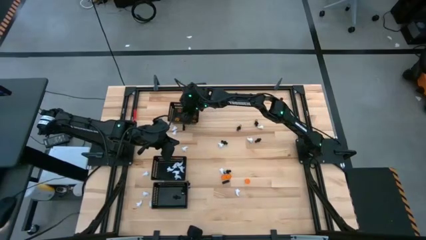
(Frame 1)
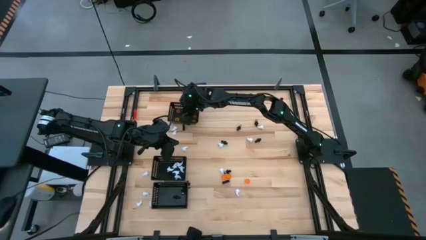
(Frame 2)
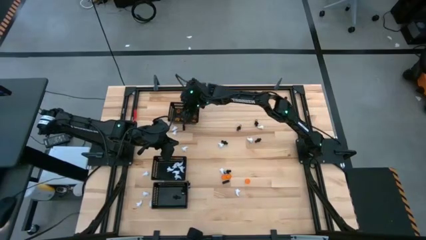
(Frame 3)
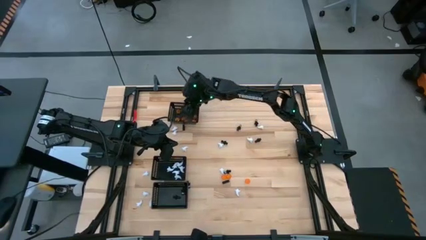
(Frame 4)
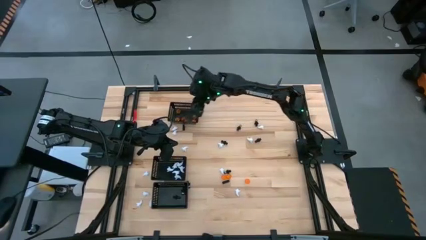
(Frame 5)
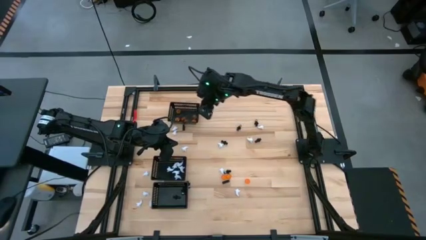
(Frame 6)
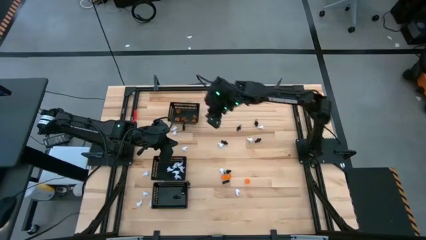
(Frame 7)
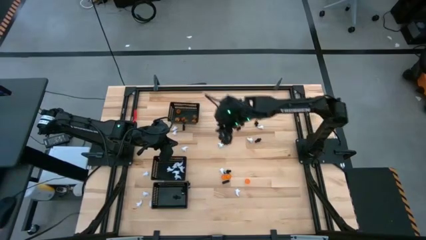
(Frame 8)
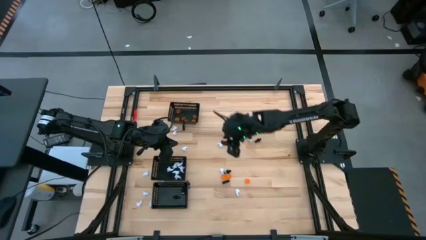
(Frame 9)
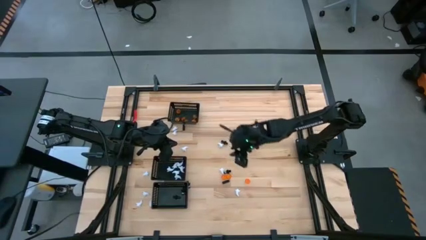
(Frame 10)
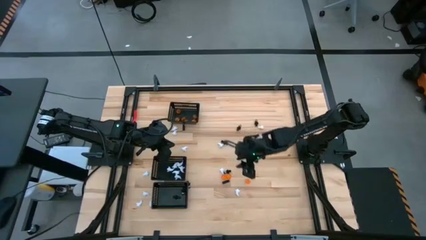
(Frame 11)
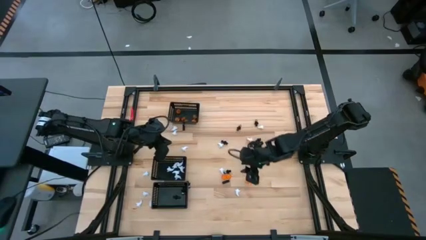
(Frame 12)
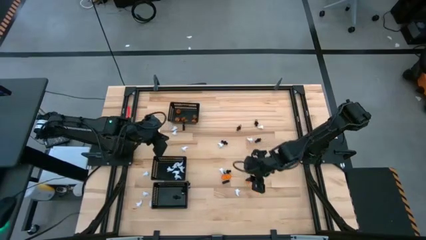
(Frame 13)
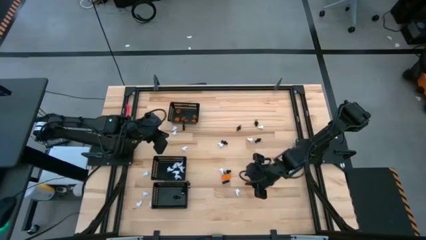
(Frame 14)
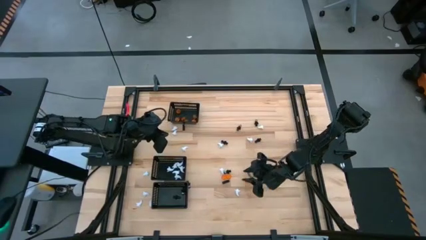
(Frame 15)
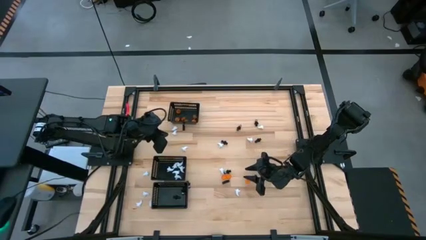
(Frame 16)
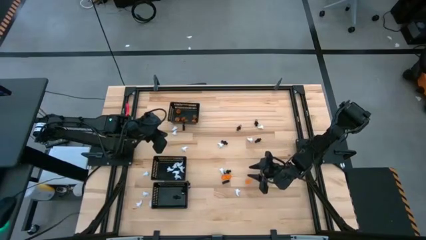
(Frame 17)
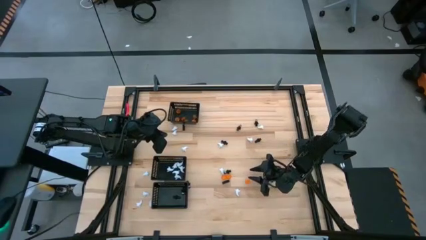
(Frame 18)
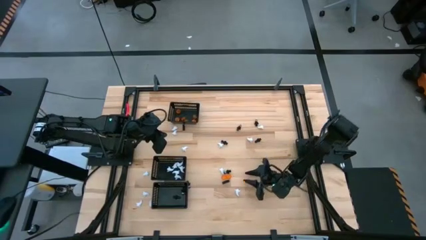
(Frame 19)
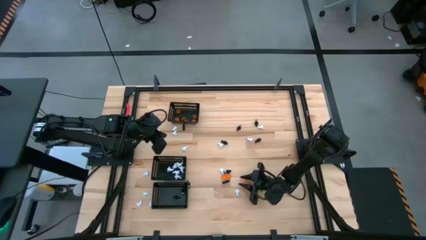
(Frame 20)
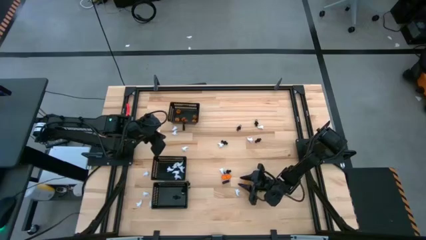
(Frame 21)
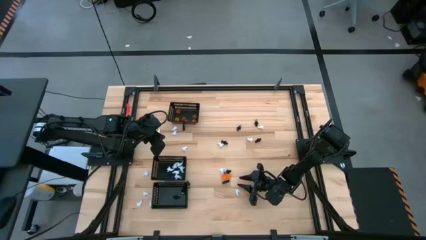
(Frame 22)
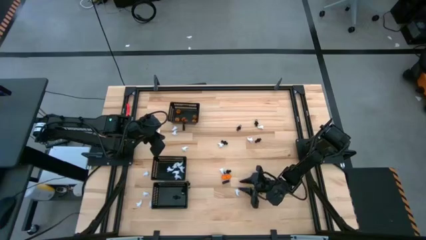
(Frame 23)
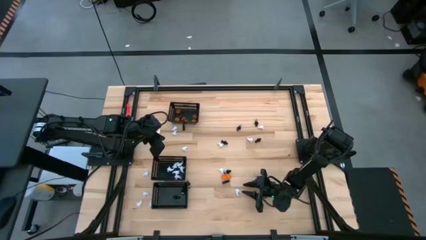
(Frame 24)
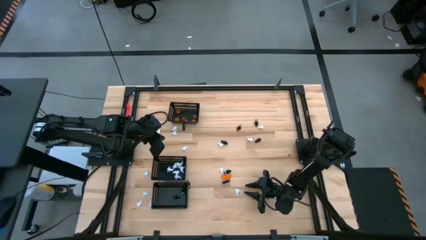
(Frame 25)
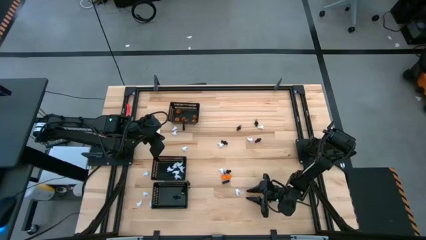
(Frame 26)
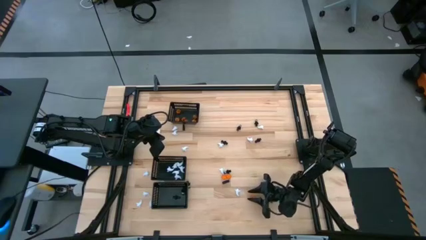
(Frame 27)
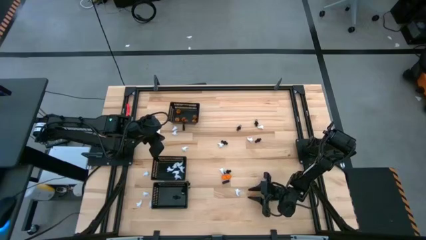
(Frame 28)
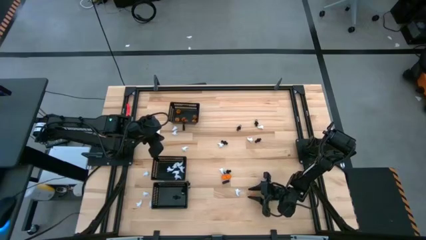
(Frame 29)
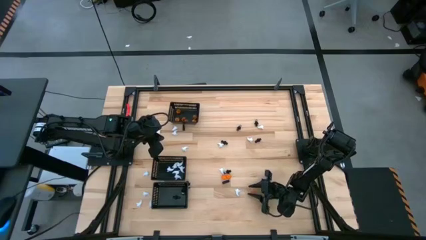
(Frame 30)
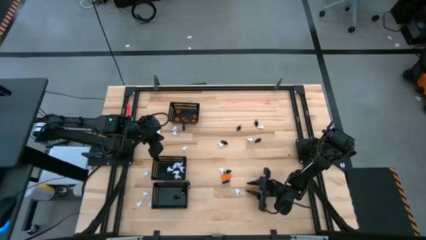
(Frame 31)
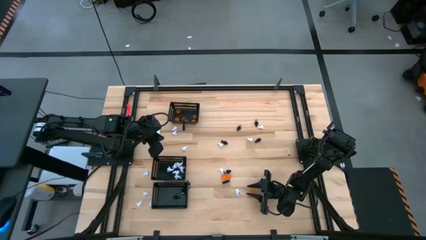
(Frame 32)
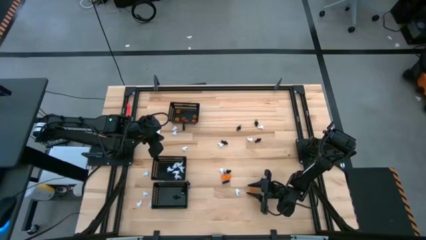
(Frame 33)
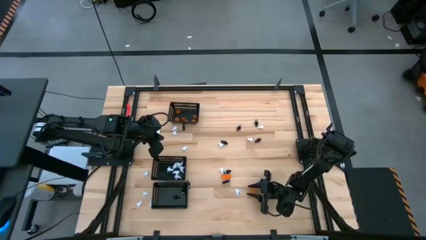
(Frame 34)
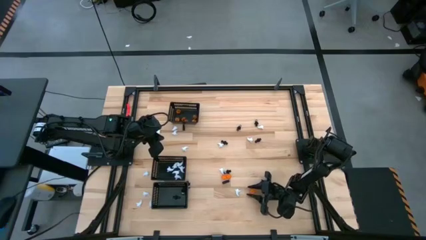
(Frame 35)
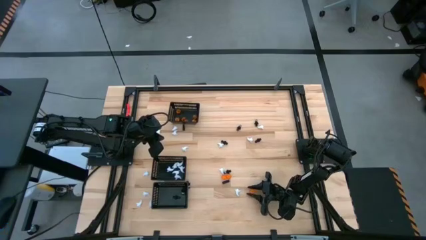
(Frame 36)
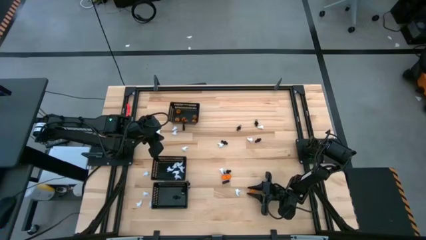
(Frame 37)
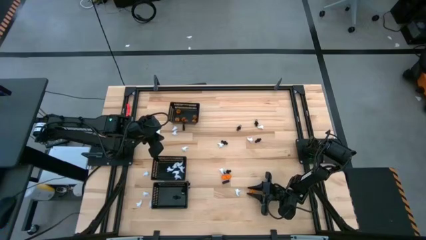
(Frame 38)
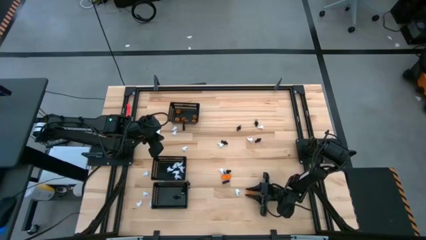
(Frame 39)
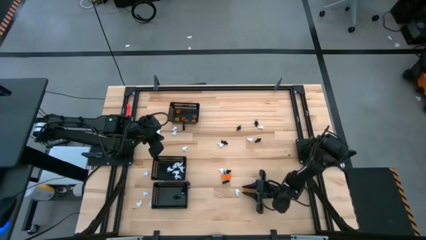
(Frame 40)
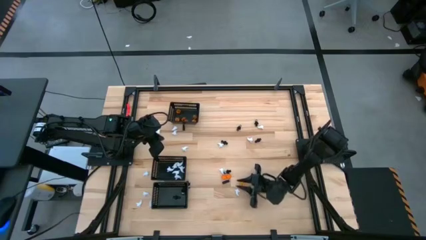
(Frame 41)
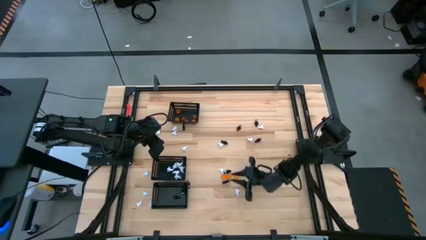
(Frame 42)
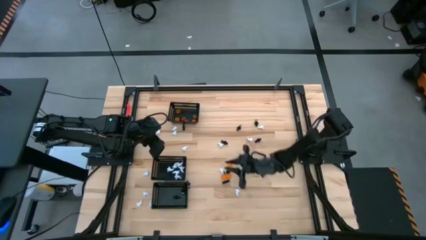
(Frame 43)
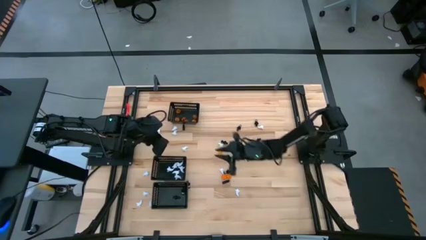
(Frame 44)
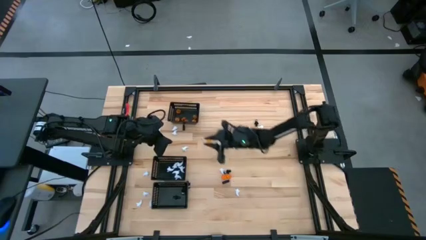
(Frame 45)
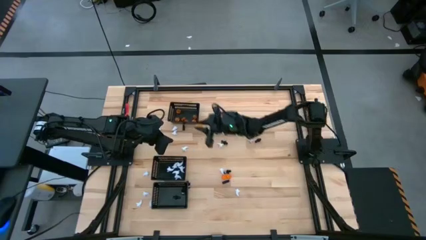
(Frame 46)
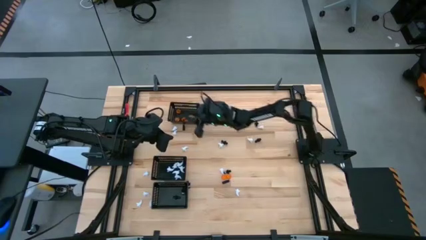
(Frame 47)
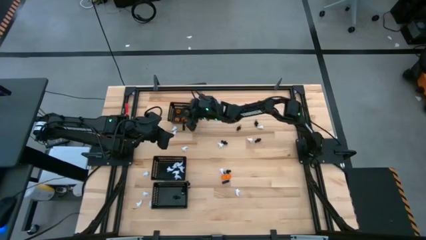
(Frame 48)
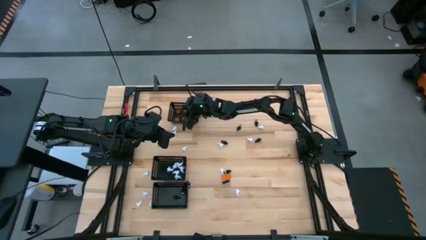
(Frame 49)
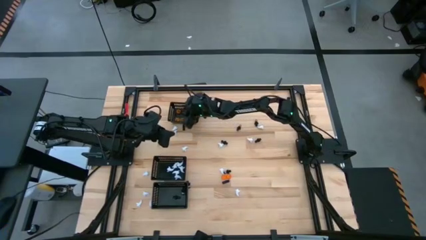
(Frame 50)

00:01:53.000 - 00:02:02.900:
Task: Sort Halloween decoration
Put the bottom right orange pumpkin toy into the top black bin

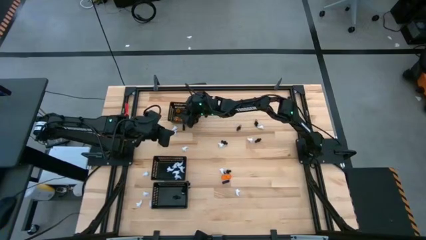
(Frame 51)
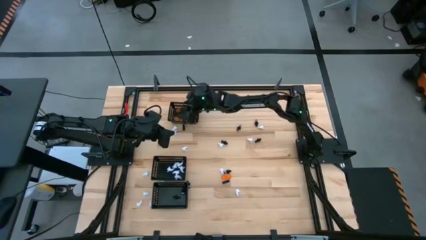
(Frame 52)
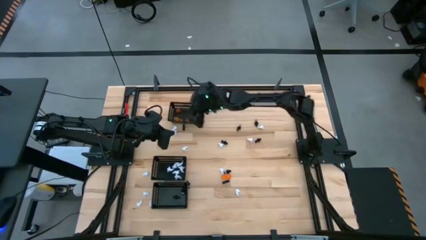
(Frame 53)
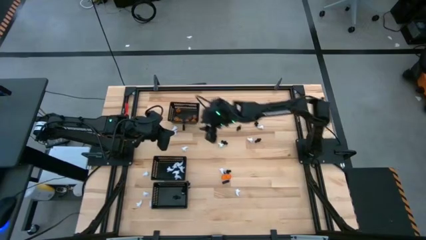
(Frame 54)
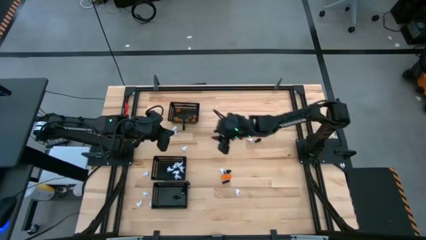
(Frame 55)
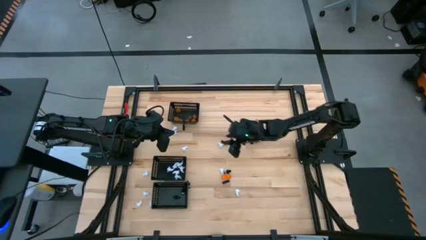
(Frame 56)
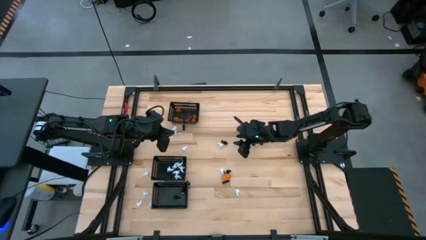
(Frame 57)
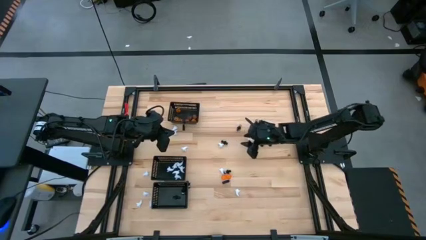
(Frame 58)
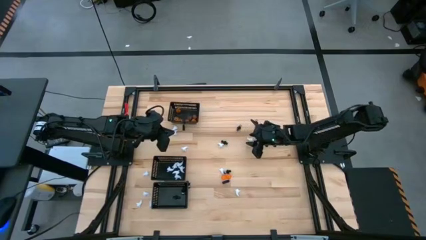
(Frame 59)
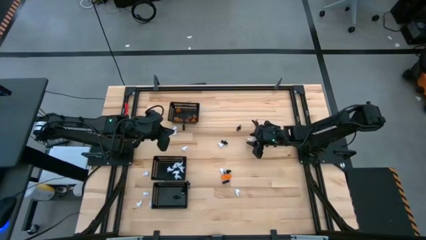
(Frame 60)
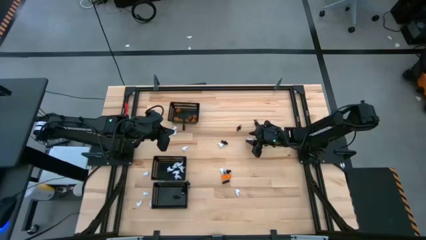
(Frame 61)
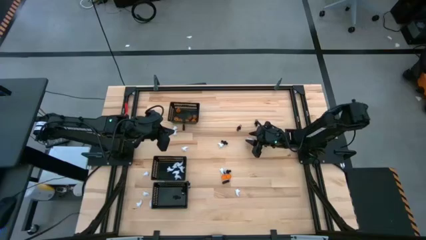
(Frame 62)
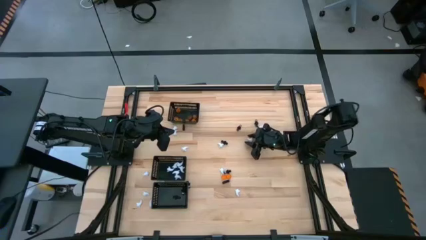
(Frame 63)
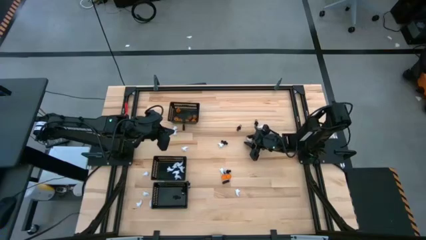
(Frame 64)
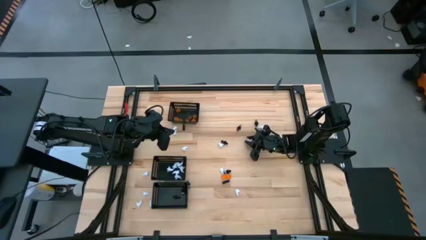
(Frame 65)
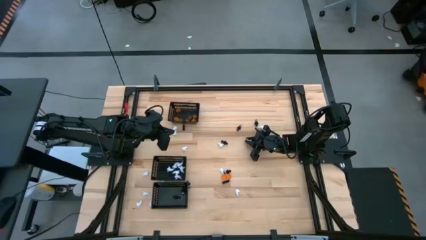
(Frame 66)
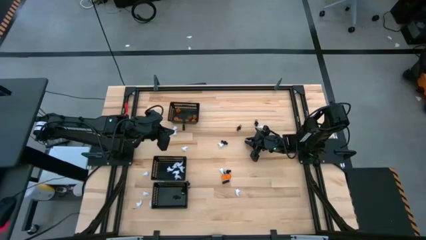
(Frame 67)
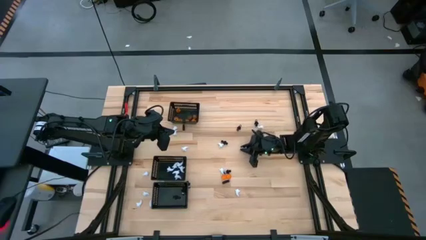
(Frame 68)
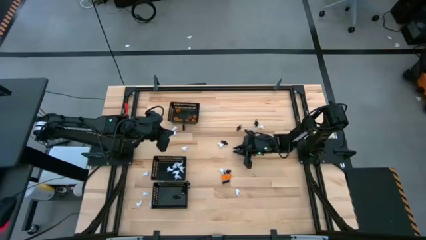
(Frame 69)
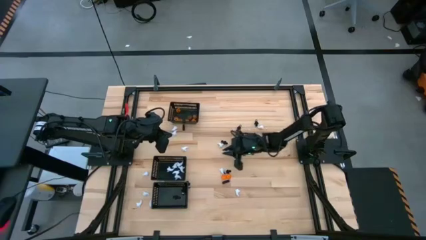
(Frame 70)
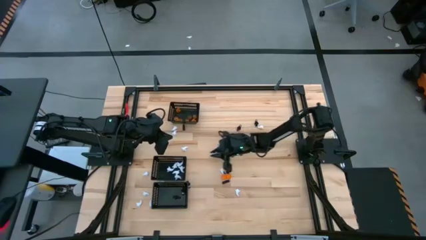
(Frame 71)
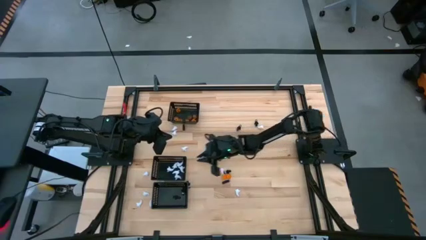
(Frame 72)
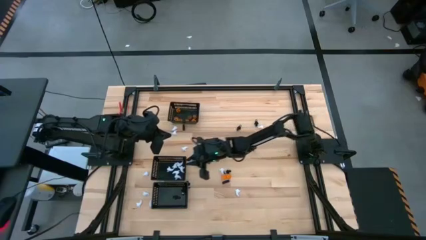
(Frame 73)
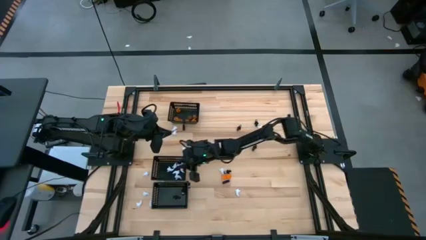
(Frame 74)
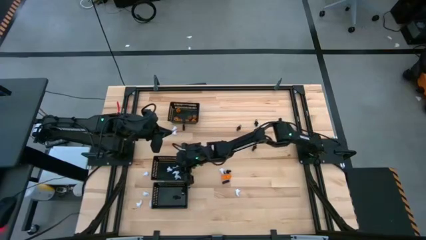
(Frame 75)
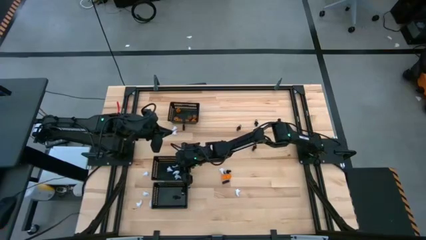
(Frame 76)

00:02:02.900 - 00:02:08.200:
Put the white toy into the middle black bin
